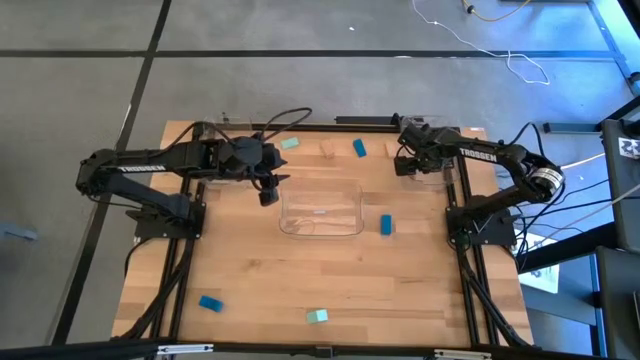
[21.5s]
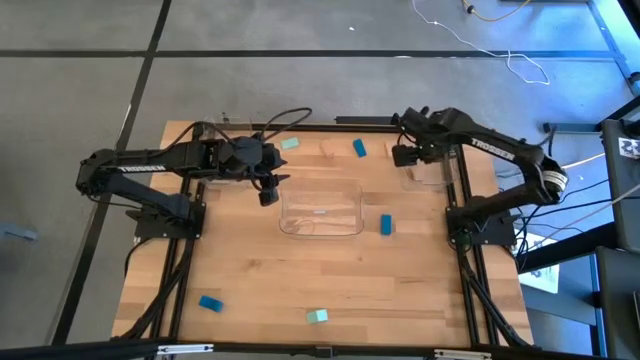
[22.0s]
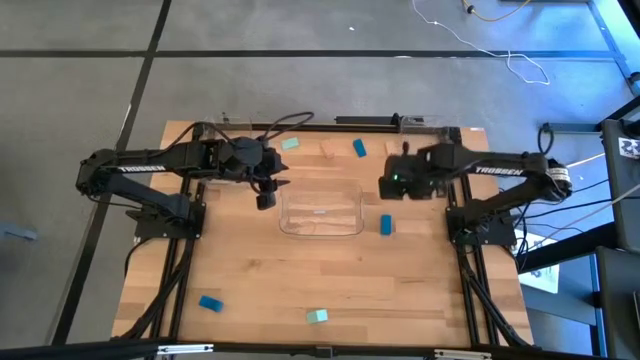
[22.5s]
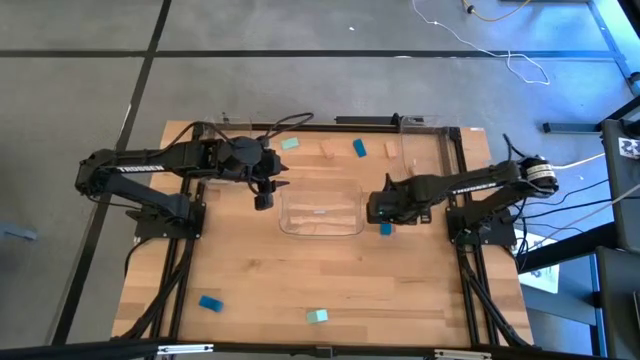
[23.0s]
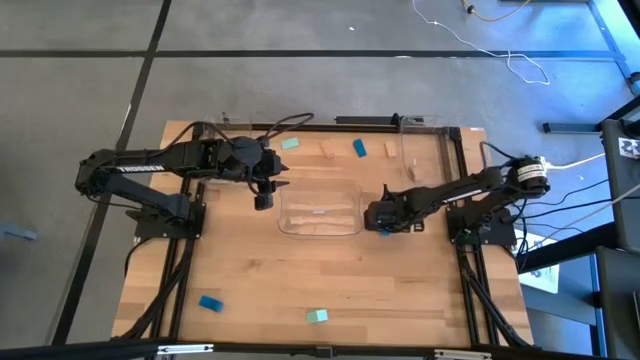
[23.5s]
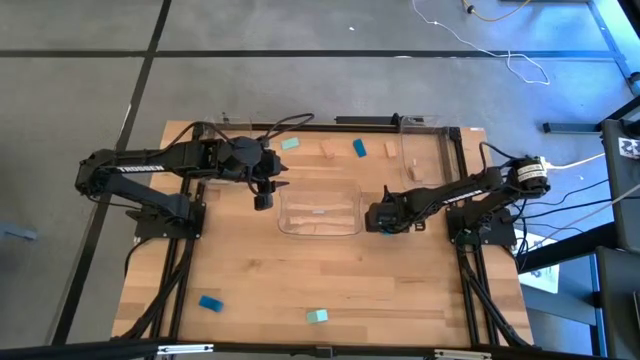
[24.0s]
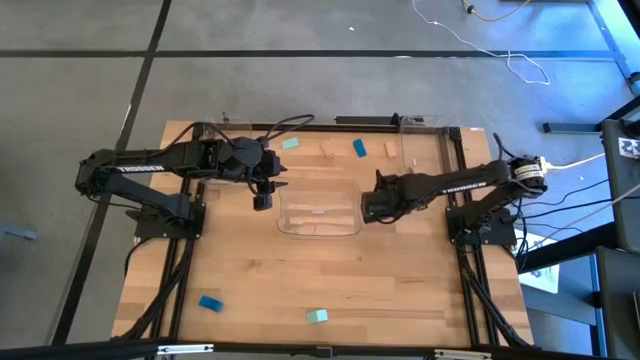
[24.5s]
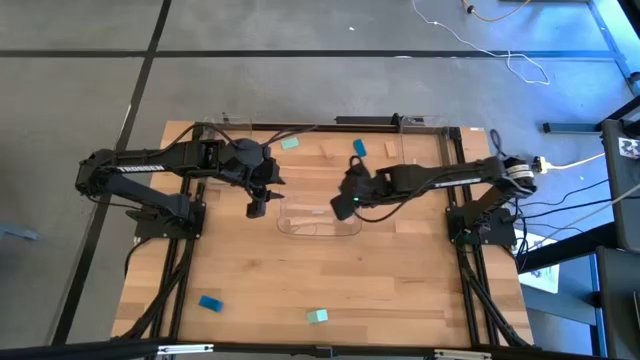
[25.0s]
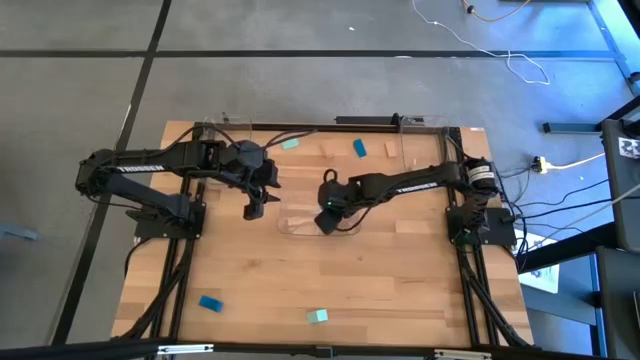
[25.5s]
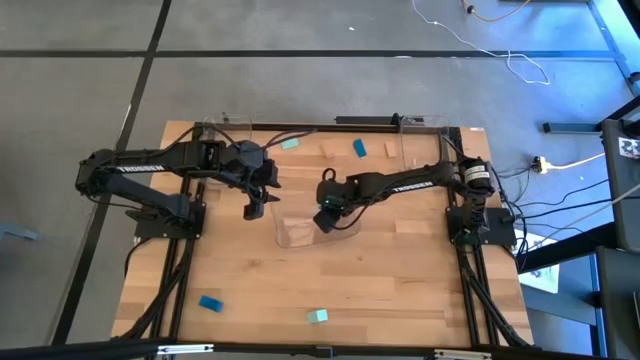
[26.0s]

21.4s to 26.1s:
Task: Sort & place blocks by color
Put the middle right blue block into the middle transparent bin

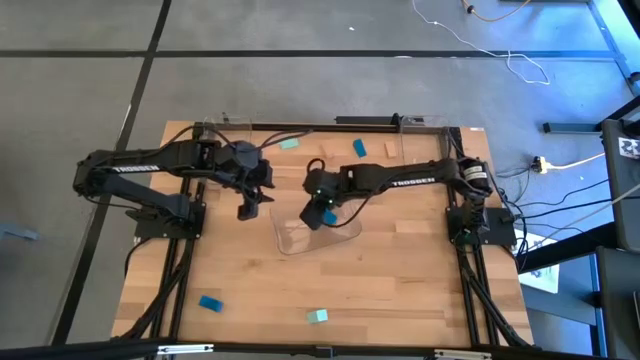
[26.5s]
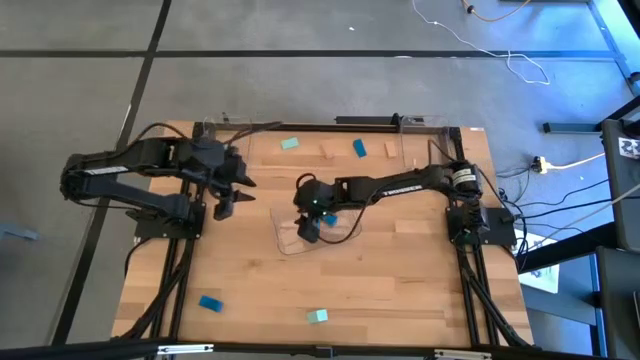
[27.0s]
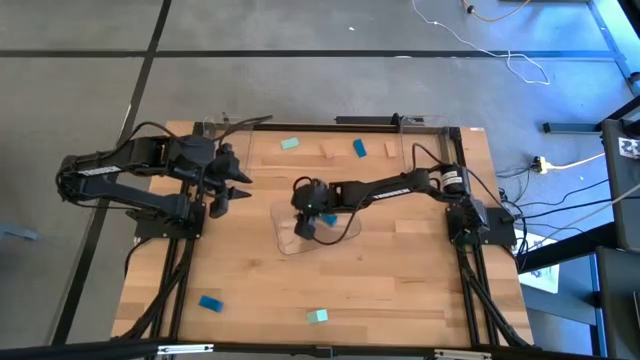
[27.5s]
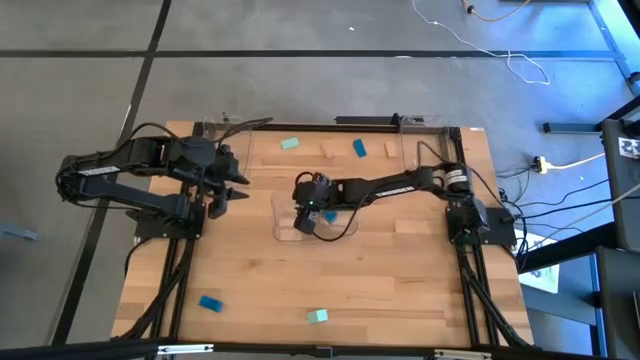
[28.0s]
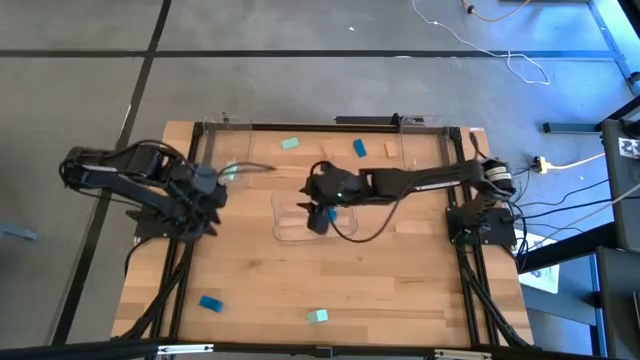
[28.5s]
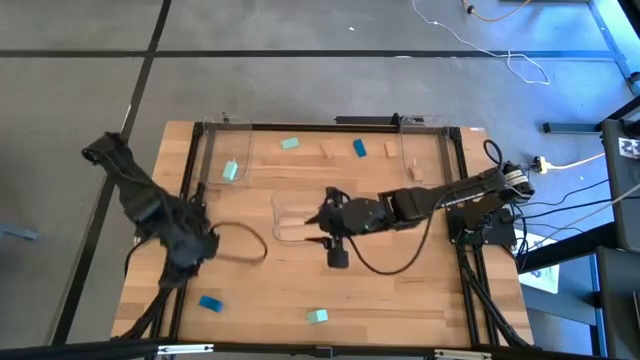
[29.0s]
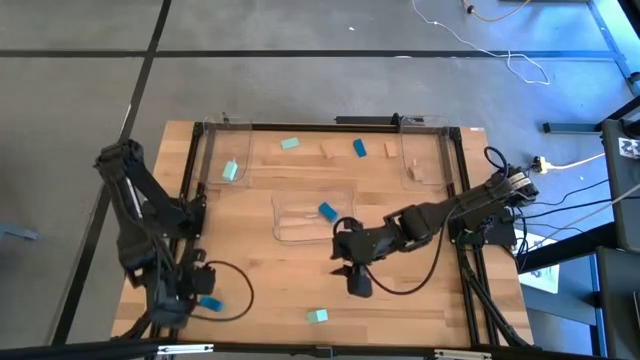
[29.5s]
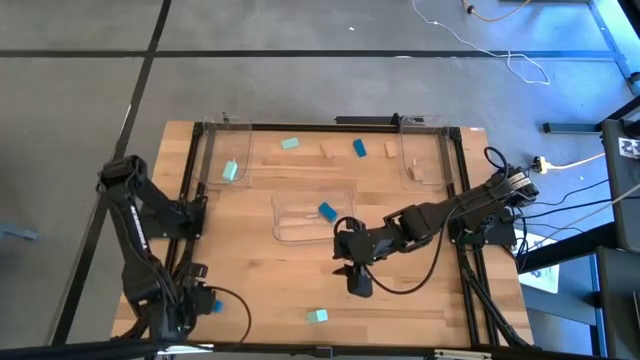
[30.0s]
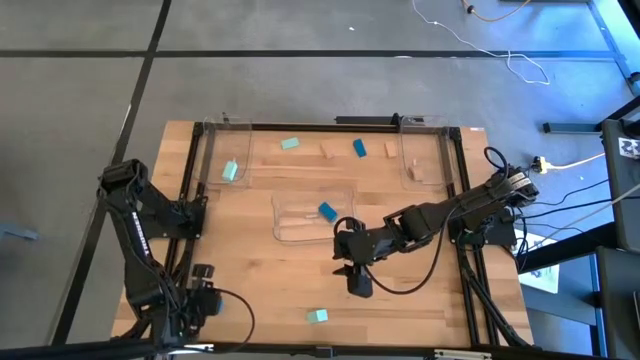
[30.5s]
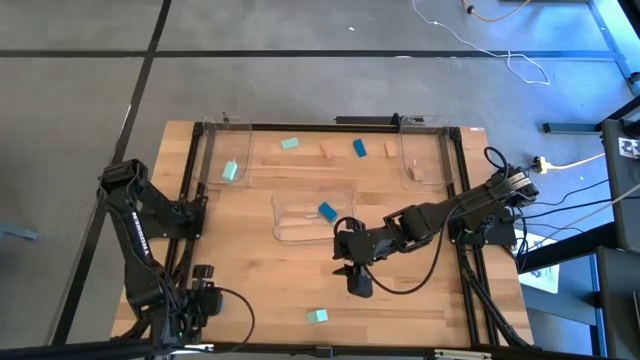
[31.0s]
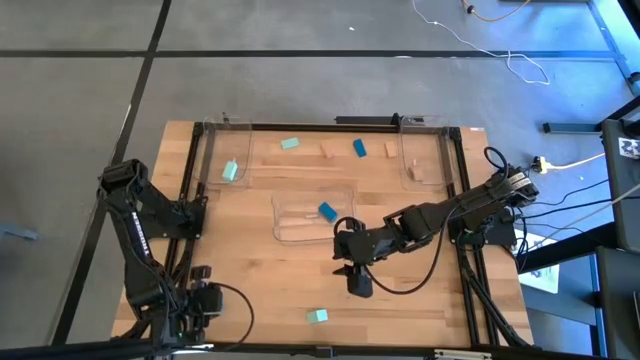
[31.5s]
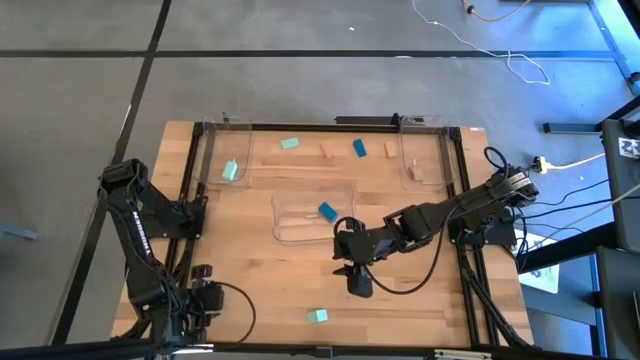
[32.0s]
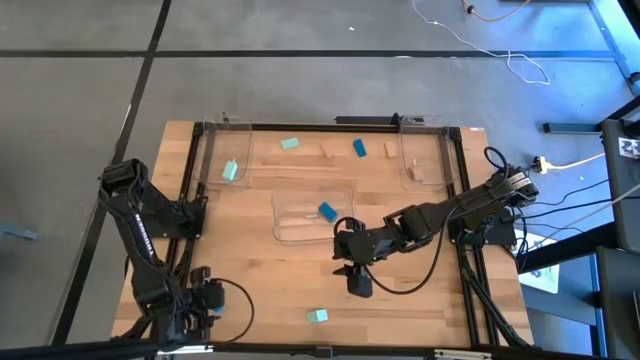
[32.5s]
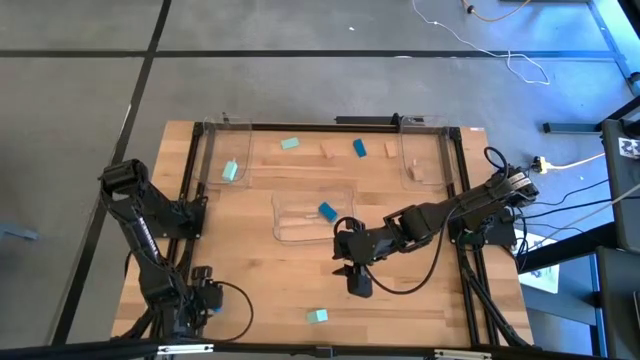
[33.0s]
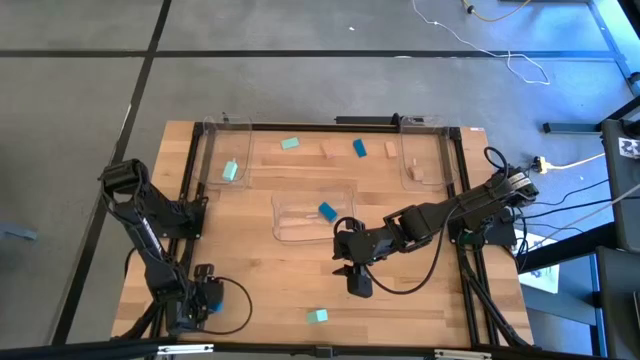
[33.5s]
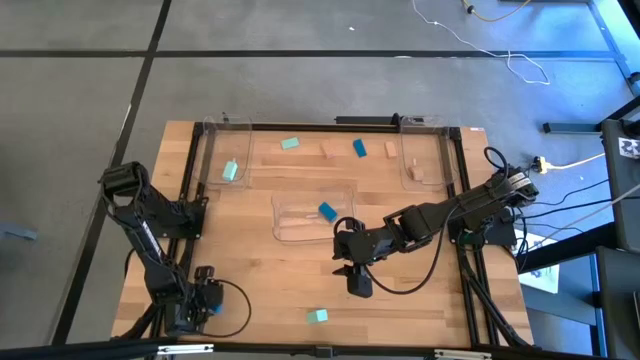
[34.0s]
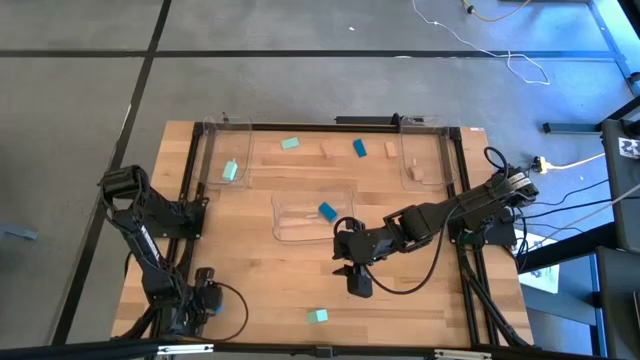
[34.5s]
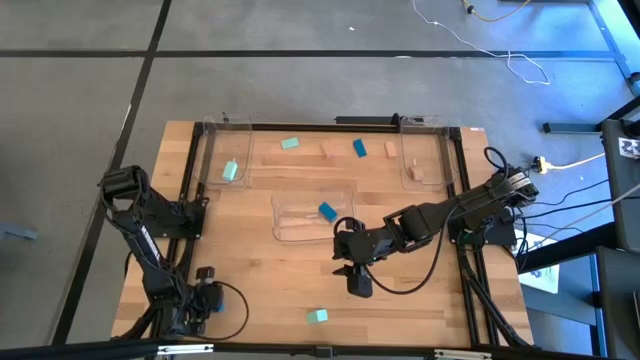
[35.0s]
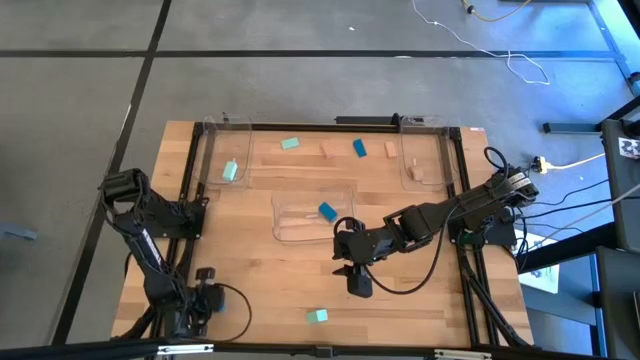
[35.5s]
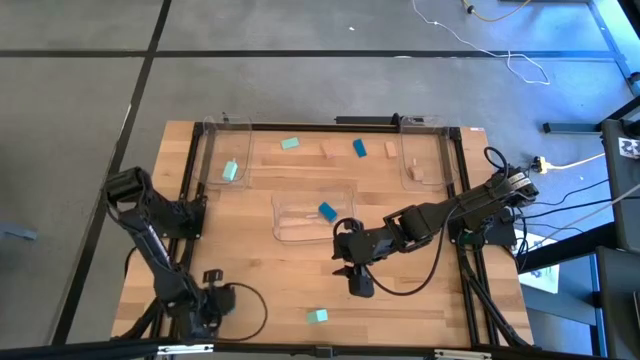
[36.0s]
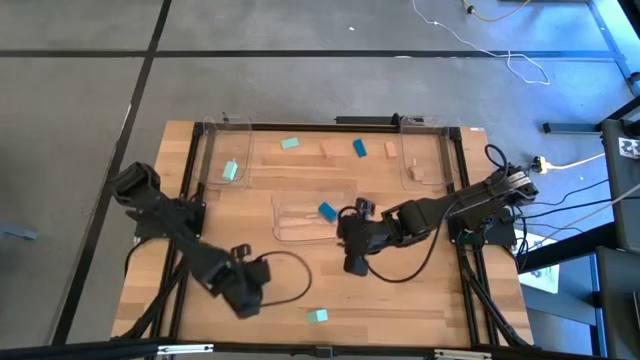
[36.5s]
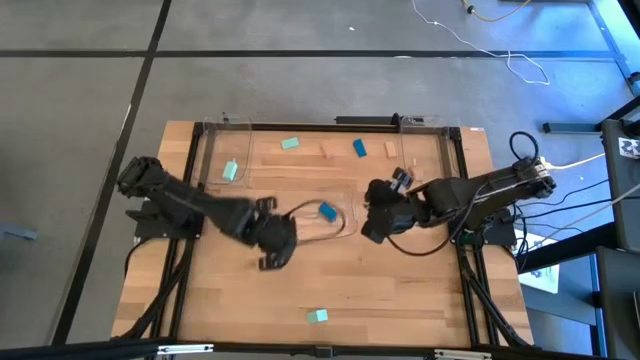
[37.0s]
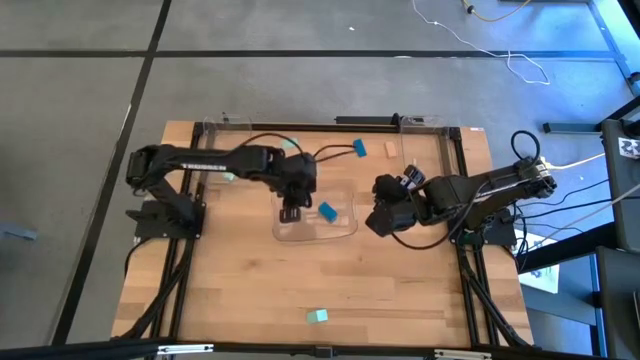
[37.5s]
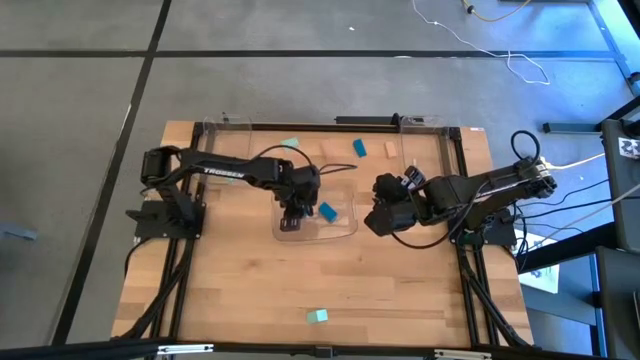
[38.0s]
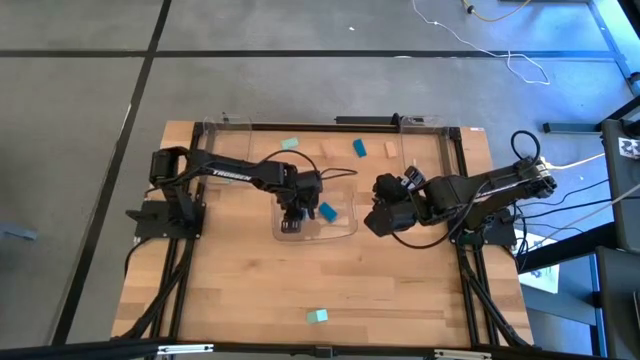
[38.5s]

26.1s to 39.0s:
Put the bottom blue block into the middle transparent bin

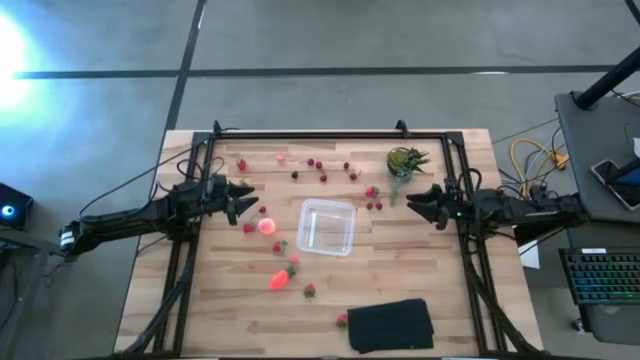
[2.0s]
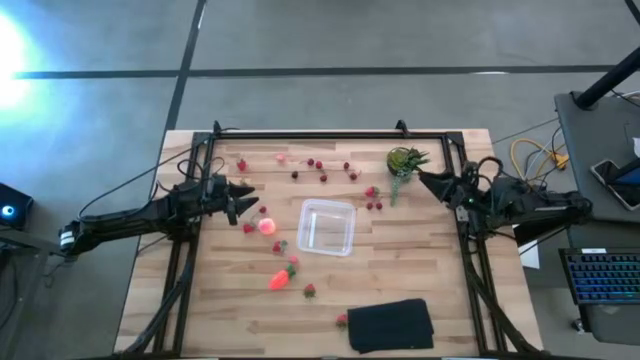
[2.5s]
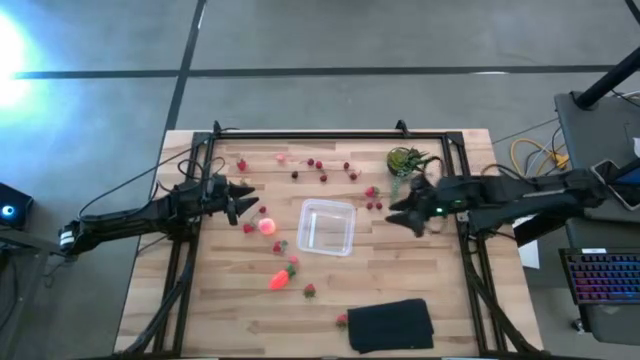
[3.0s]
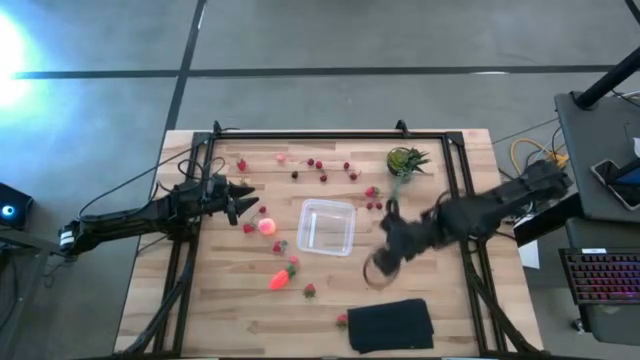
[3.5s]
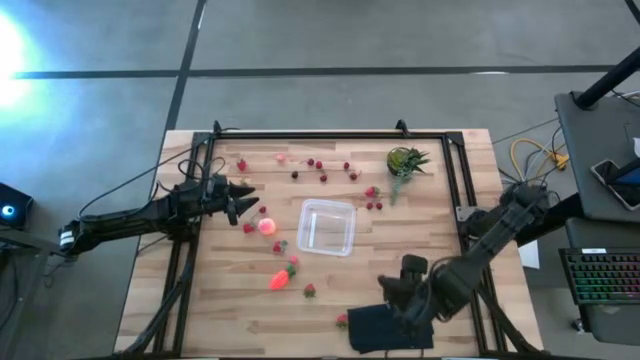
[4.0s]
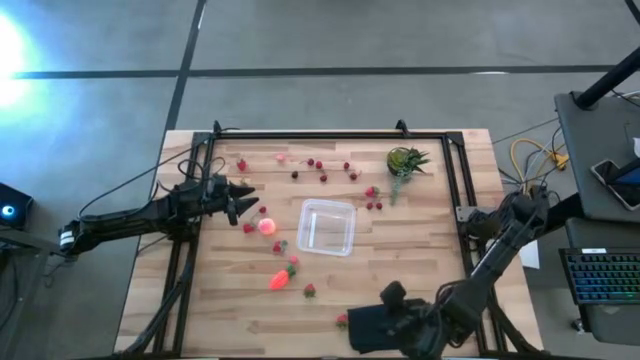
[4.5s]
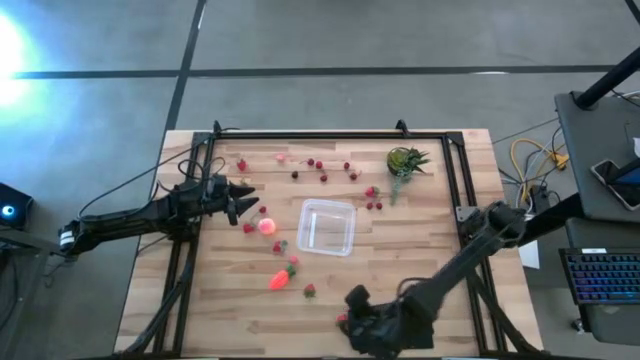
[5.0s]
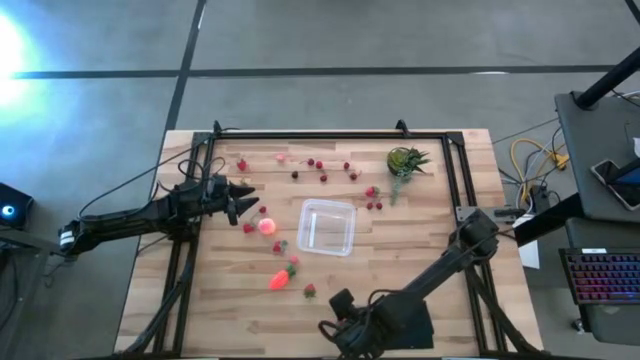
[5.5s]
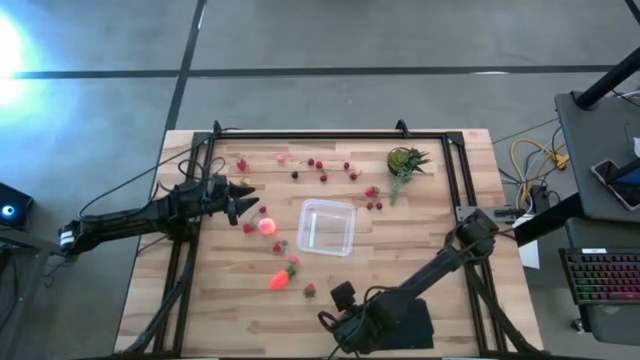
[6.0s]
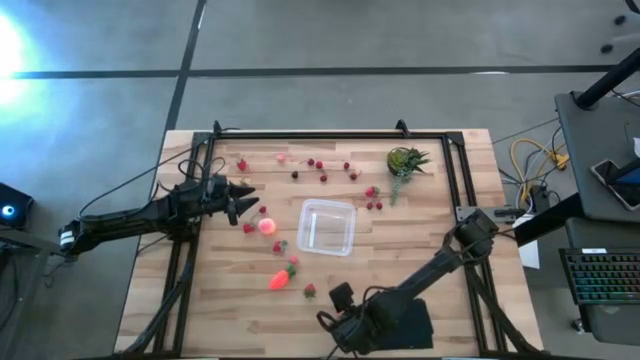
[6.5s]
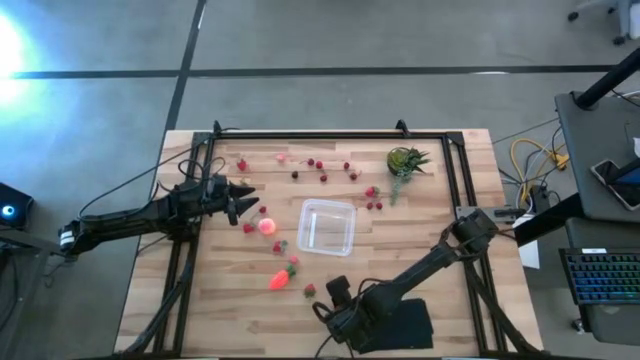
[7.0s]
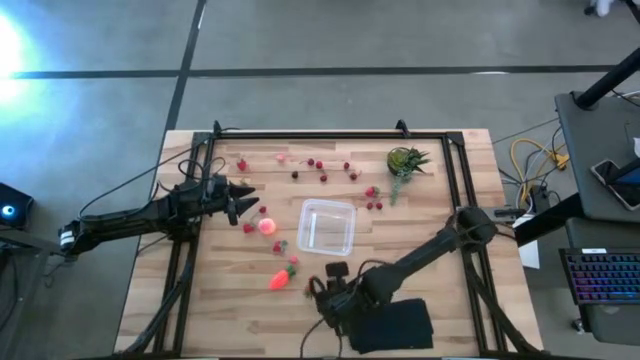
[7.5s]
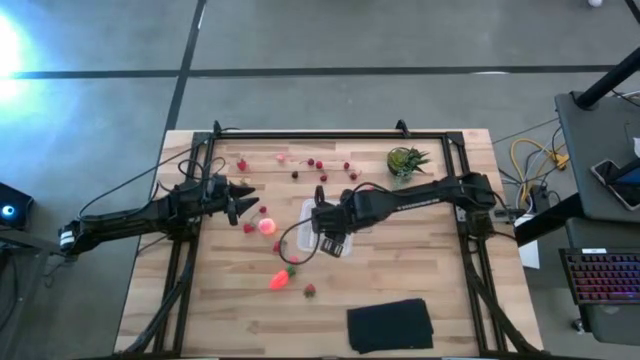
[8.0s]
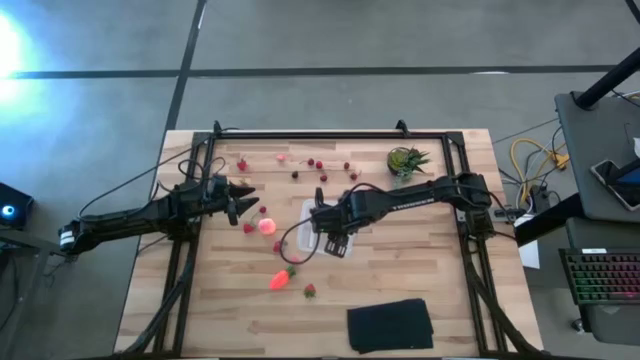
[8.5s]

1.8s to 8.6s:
Task: Pick and placing Produce into tupperware
Put the red strawberry into the transparent bin
